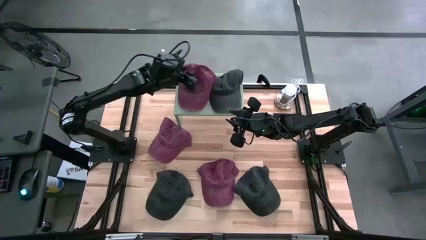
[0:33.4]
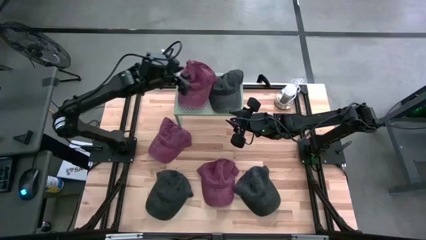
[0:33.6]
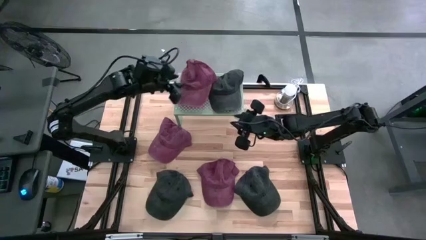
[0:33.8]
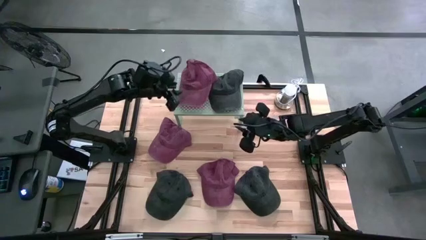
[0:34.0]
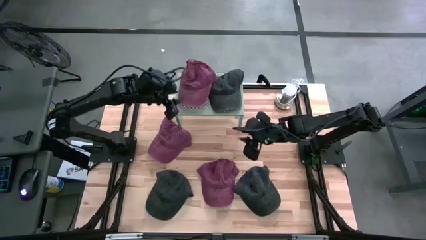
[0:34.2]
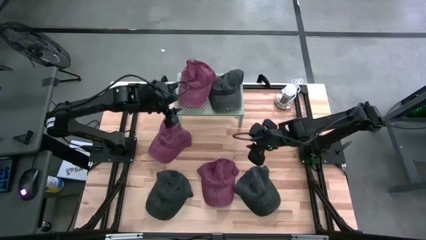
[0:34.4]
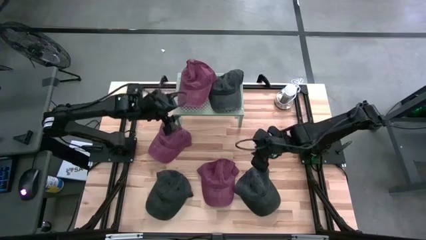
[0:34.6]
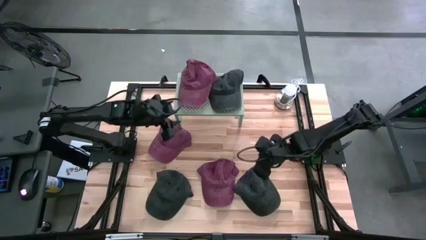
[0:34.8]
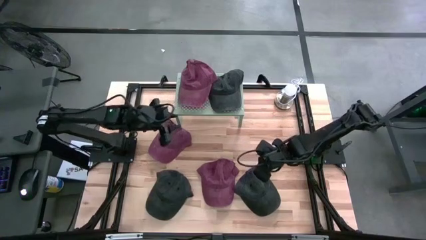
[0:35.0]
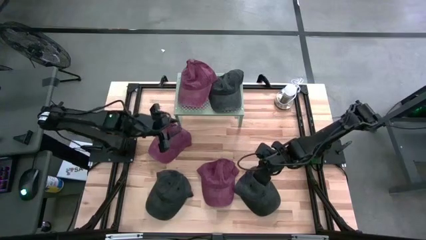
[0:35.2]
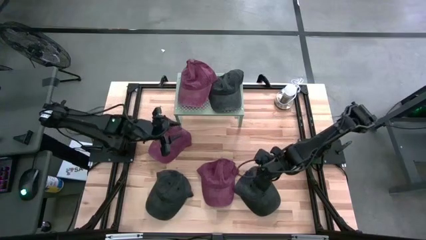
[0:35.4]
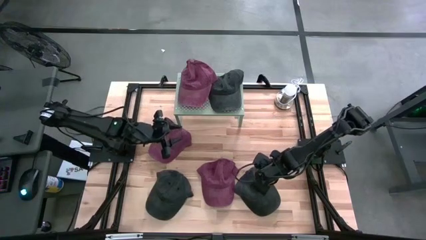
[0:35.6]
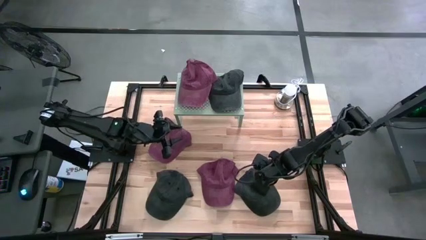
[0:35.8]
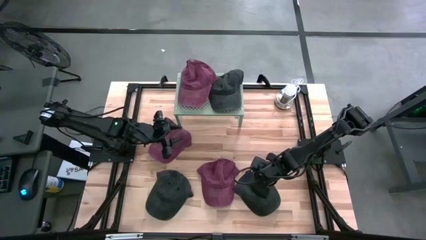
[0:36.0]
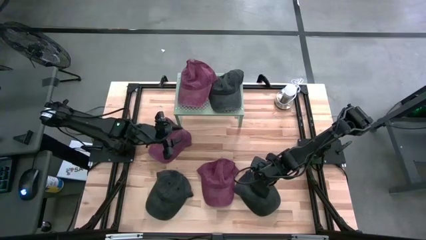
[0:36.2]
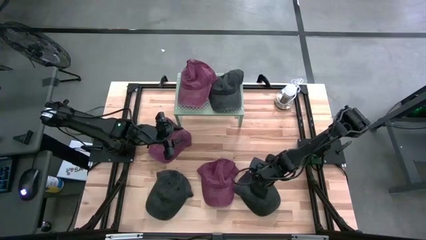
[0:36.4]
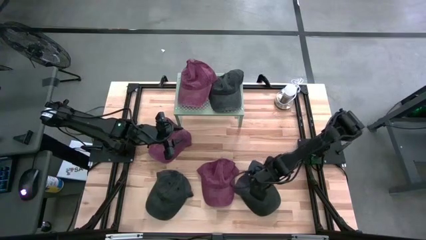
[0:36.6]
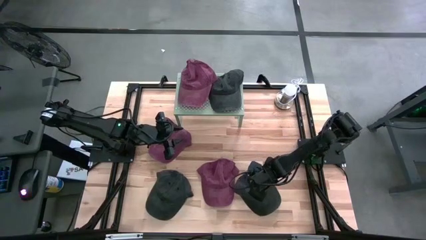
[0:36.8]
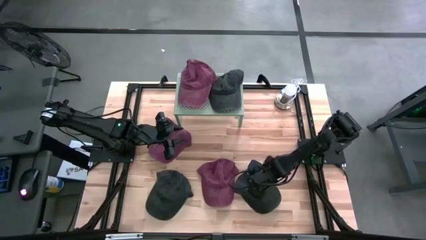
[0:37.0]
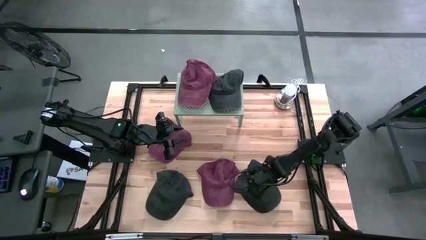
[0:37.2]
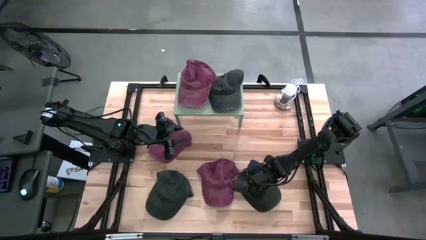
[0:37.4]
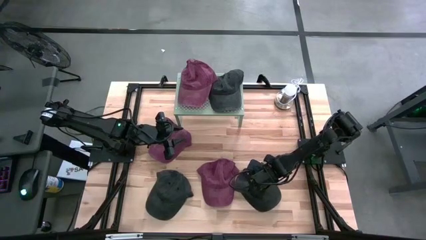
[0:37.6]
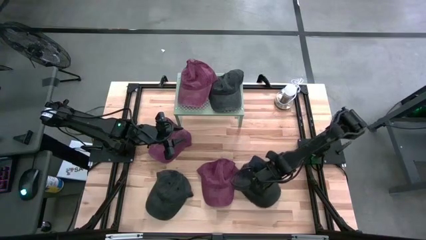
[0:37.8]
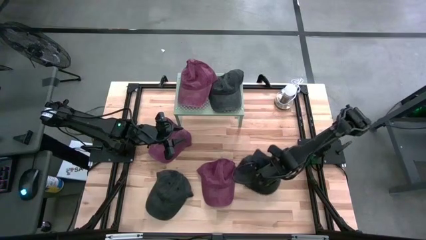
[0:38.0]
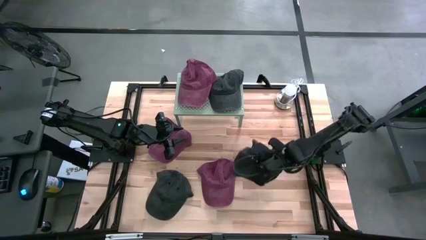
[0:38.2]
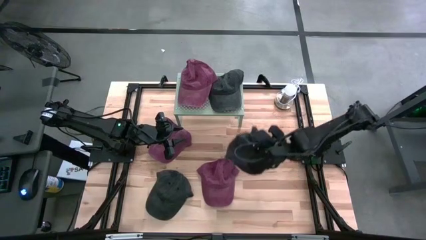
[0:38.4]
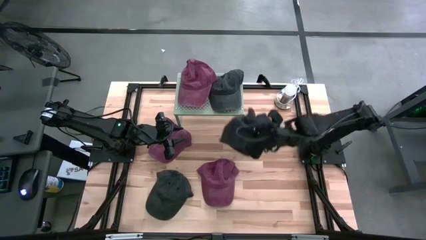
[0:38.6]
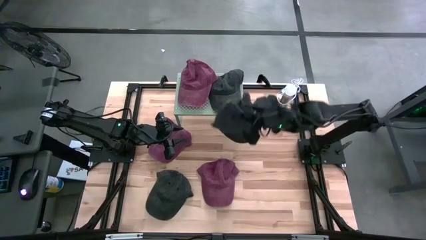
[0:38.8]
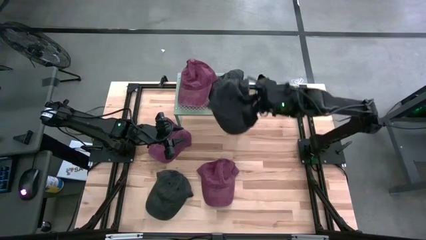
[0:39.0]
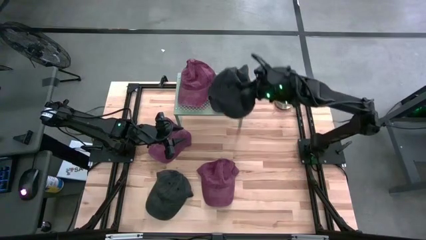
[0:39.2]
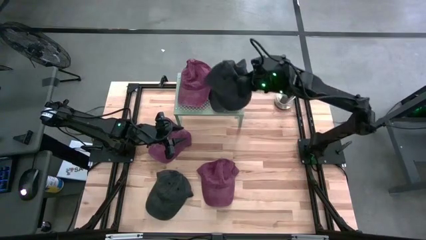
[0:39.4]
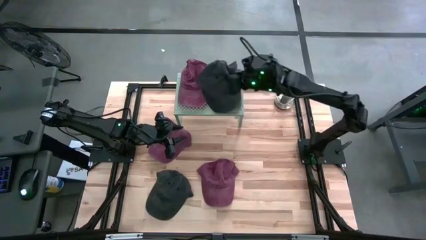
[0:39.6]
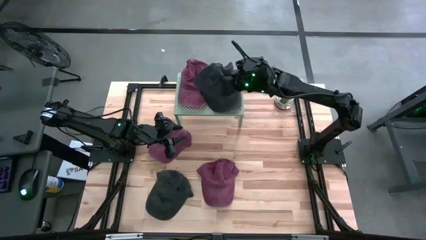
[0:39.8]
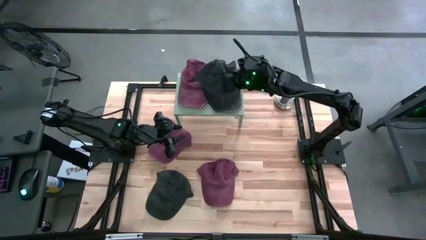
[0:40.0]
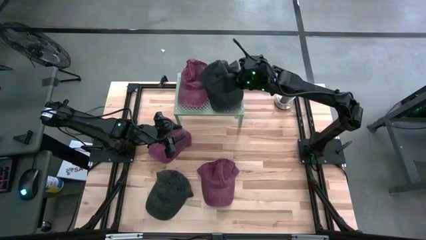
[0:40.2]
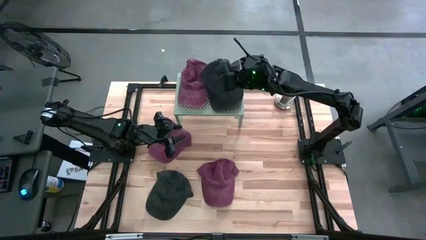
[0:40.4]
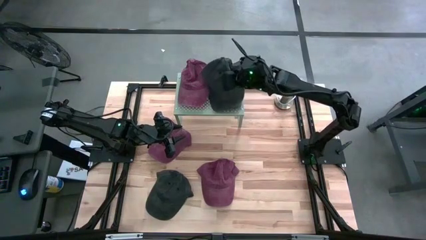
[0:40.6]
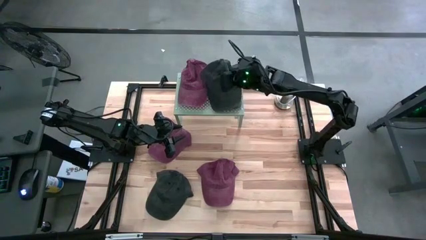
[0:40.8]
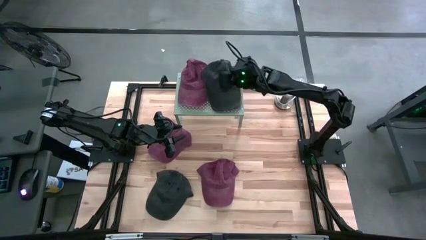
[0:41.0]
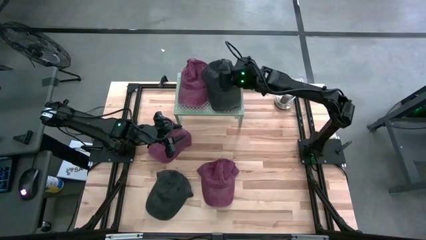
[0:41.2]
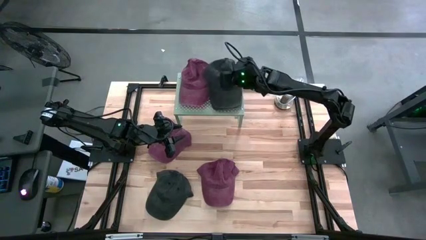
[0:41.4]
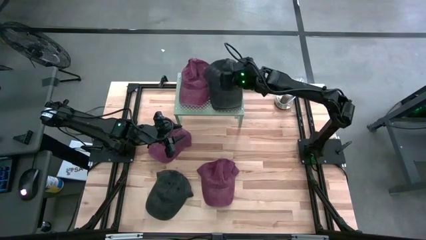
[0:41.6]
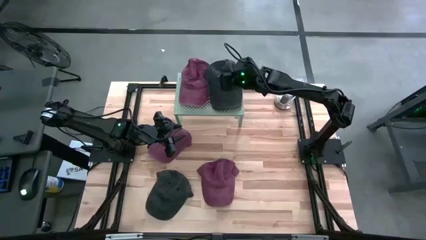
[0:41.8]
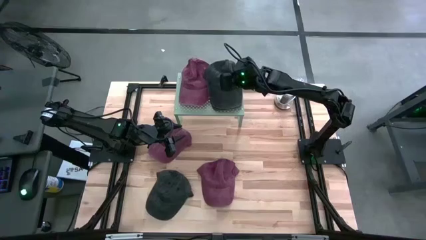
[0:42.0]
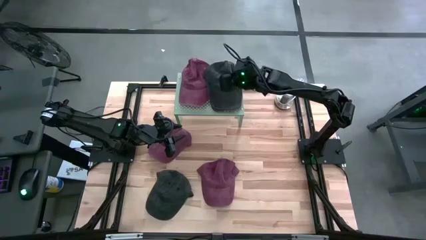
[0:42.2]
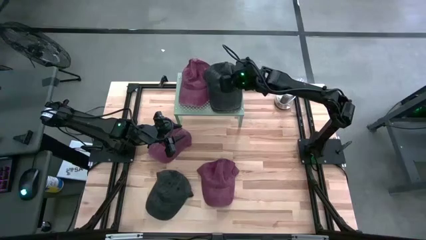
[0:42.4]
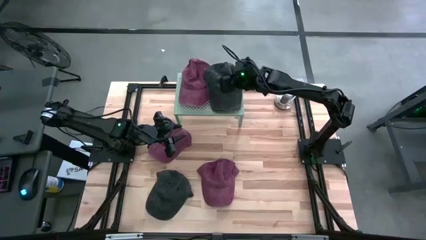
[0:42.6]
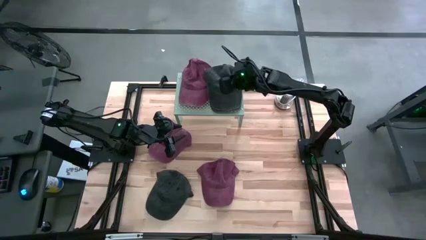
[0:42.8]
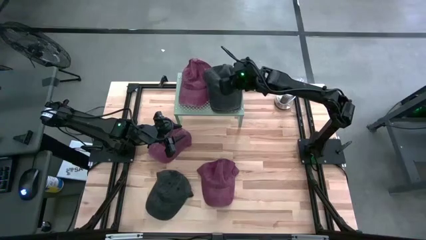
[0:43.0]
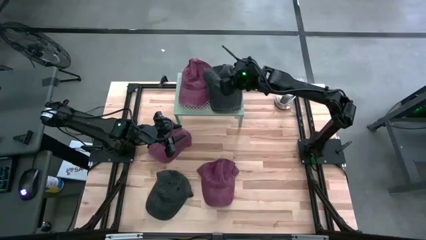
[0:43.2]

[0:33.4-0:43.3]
Task: Pick & Place hat
Stack the right black cap on top of the black cap on the shelf

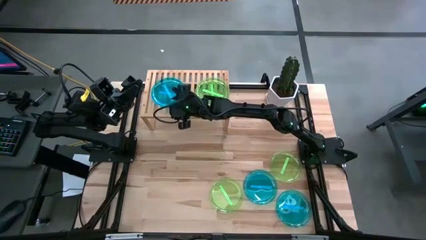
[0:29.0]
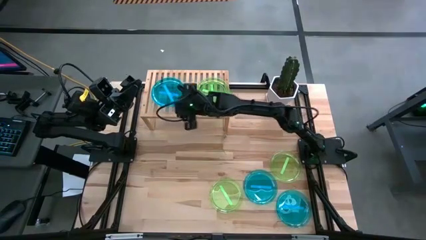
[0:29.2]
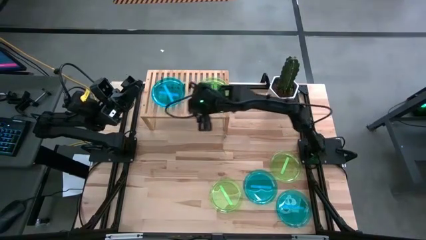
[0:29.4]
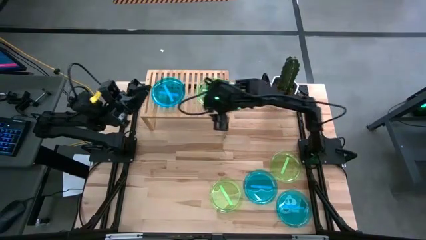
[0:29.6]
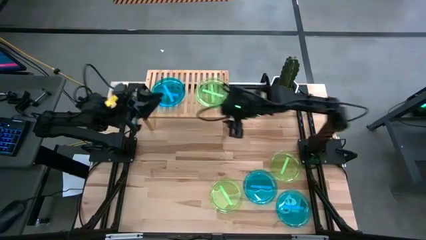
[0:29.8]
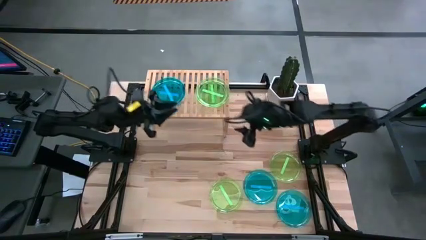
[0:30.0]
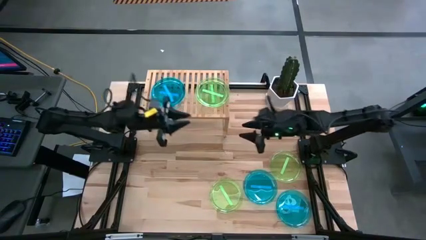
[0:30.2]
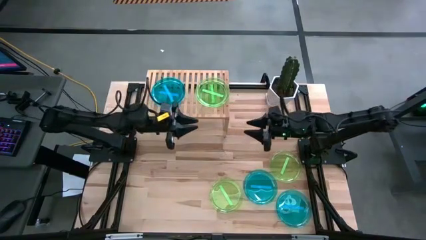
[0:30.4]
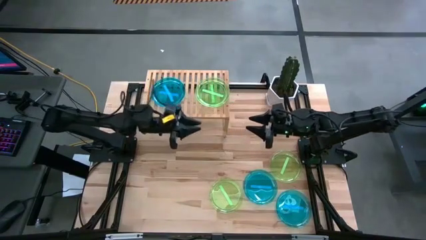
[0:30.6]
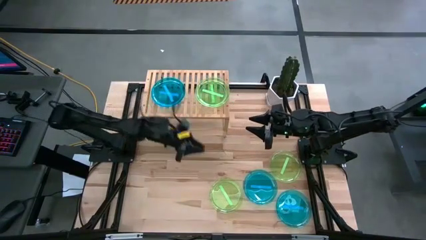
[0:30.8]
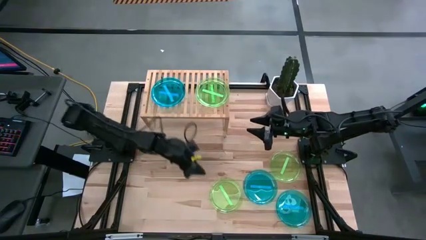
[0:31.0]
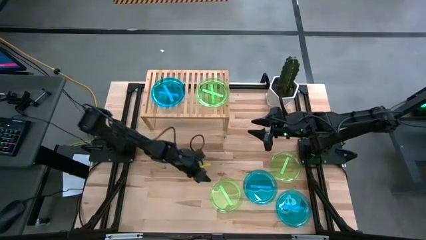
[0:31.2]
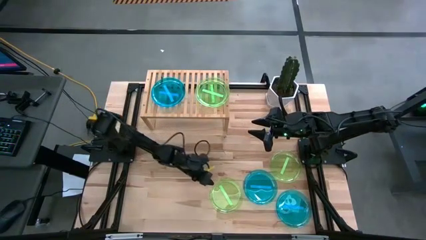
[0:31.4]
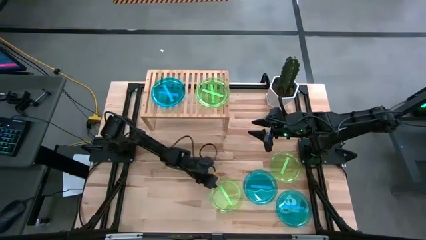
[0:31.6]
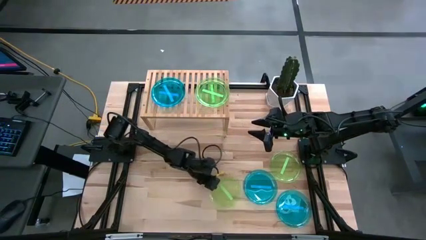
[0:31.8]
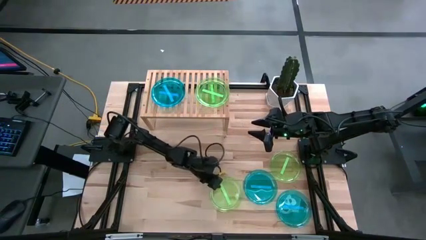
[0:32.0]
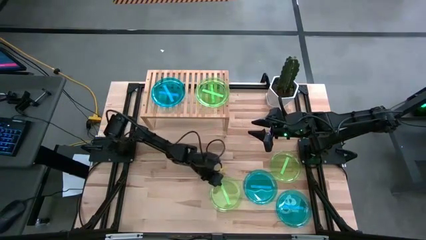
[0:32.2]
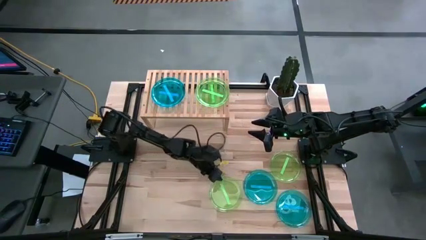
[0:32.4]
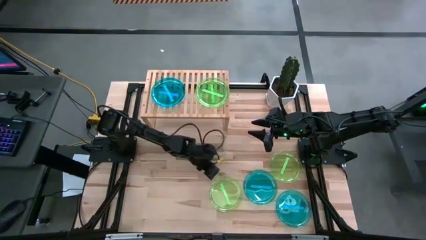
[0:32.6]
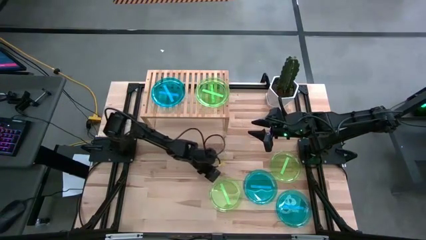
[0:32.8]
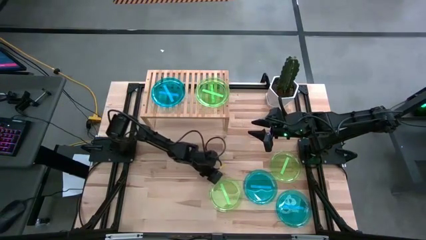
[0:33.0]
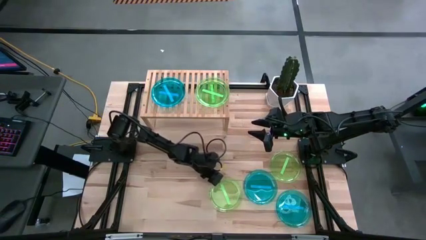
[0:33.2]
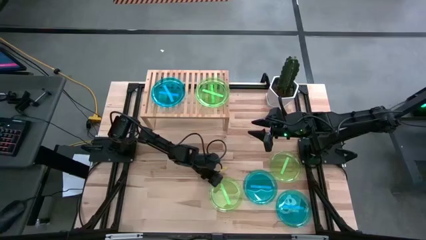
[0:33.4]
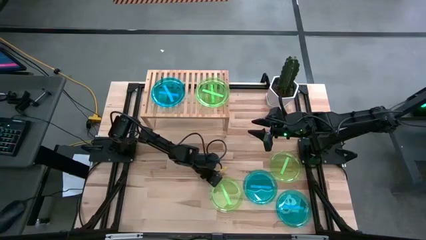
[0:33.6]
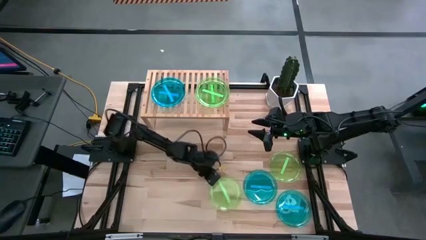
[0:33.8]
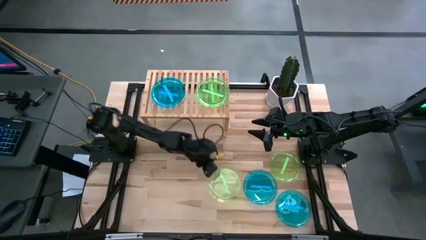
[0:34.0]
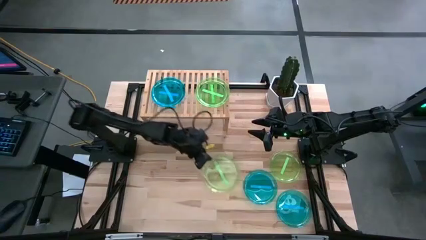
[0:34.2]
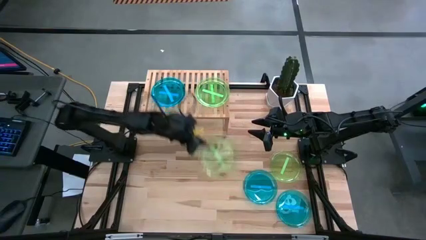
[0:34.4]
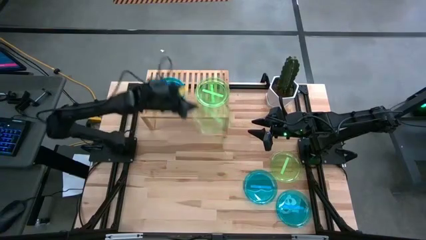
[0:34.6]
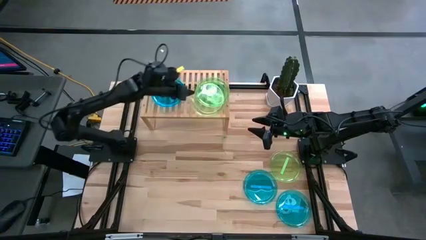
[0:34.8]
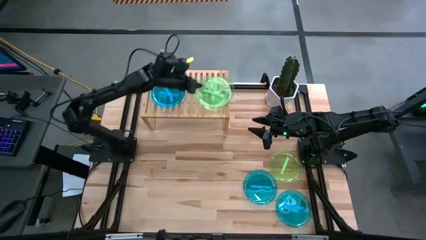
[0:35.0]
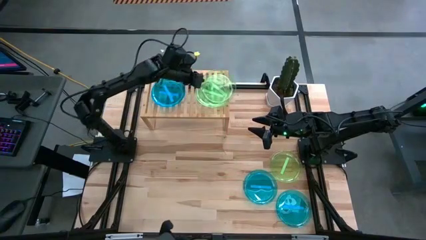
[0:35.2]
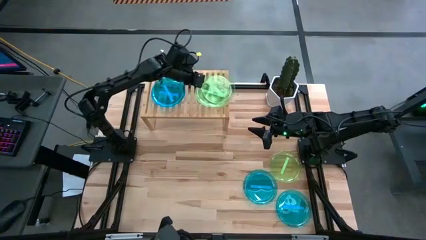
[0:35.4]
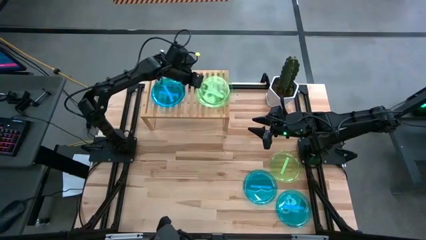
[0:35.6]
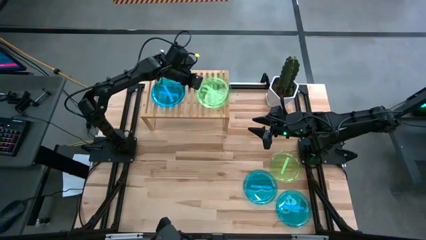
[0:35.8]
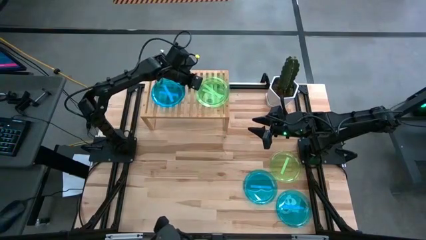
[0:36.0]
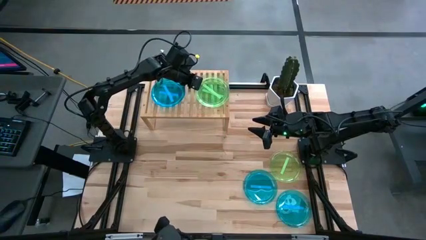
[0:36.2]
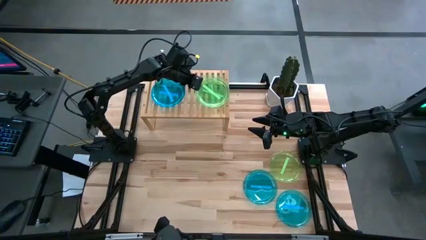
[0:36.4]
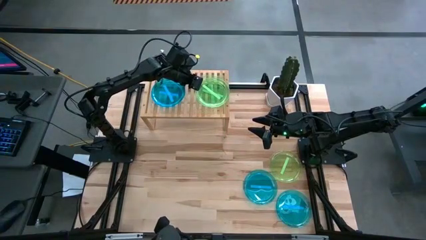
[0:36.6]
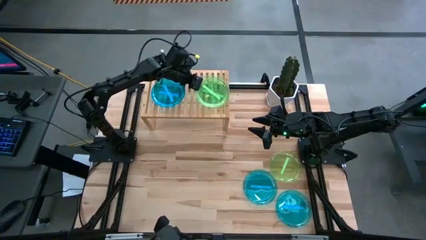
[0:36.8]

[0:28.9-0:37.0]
Task: Place and stack plates onto a shelf
Stack the green plate on top of the green plate on the shelf
